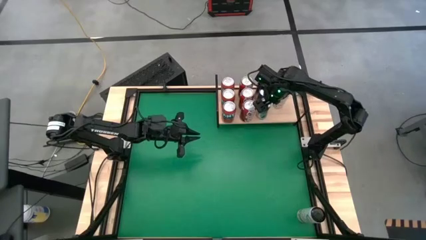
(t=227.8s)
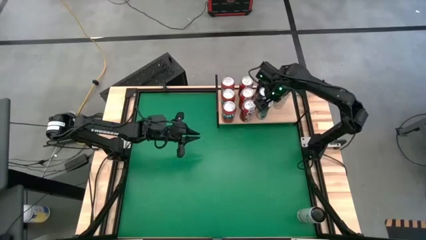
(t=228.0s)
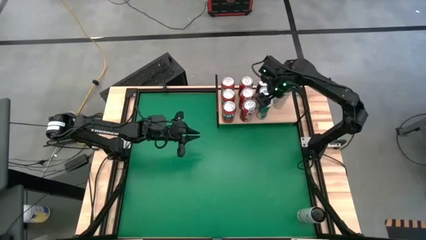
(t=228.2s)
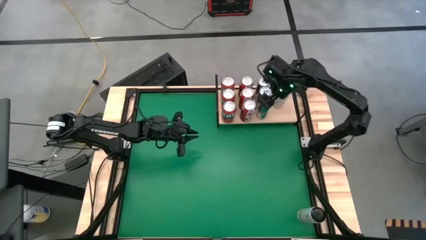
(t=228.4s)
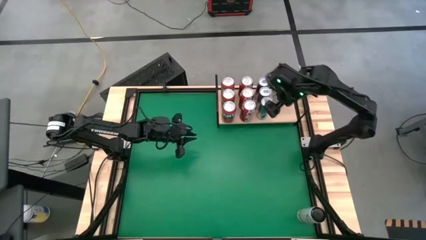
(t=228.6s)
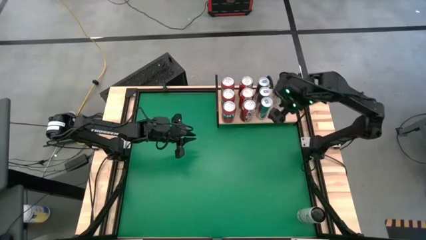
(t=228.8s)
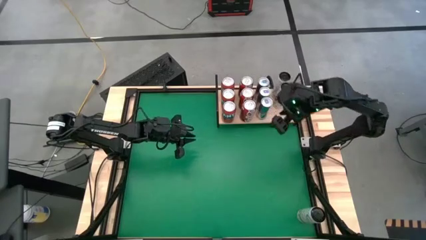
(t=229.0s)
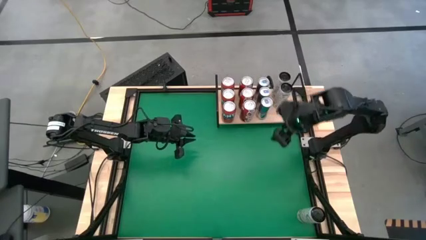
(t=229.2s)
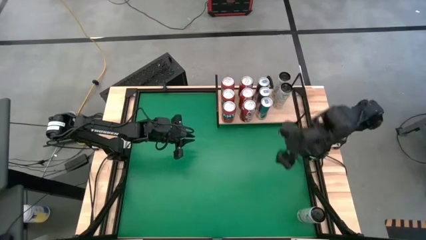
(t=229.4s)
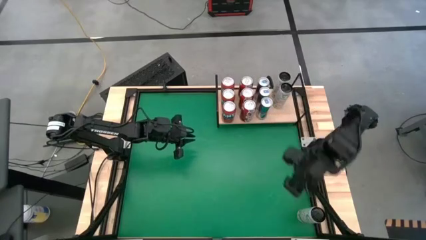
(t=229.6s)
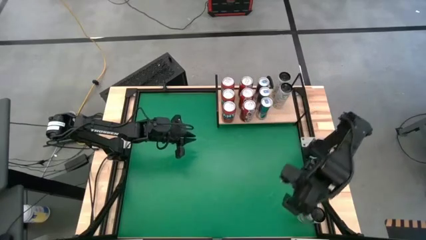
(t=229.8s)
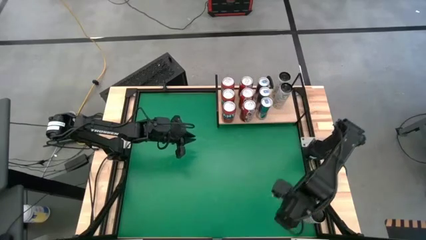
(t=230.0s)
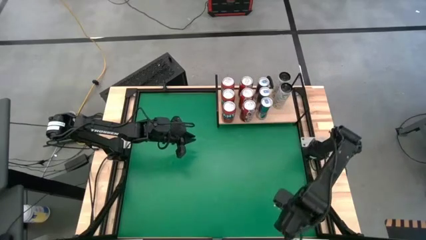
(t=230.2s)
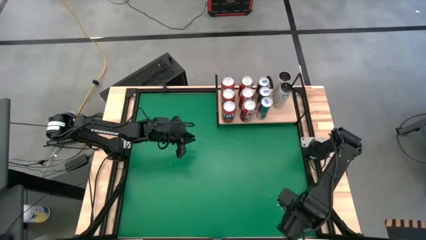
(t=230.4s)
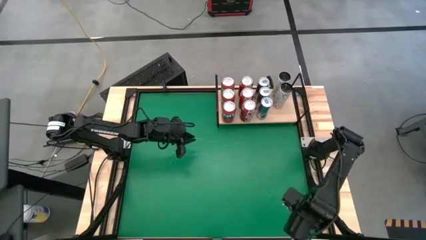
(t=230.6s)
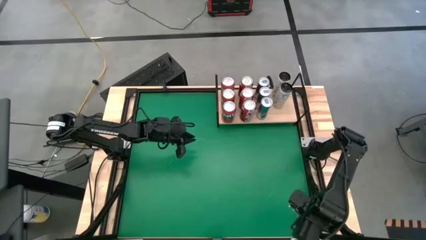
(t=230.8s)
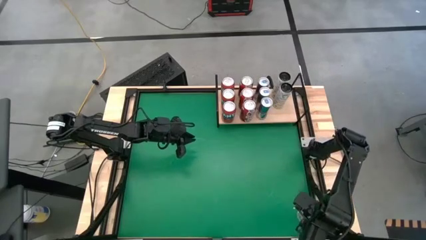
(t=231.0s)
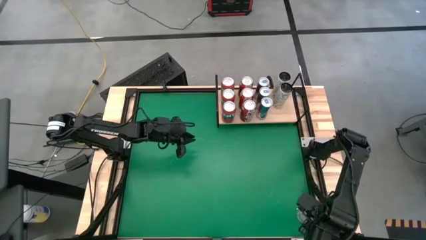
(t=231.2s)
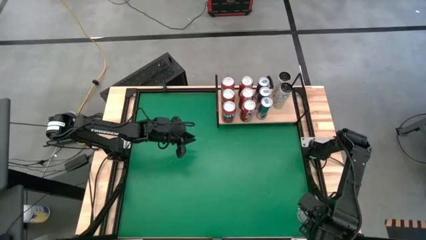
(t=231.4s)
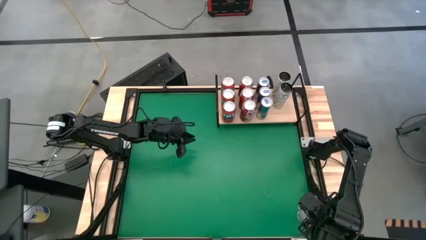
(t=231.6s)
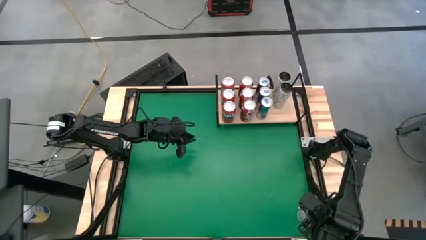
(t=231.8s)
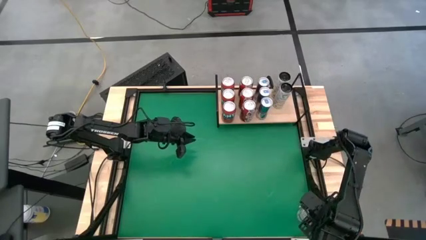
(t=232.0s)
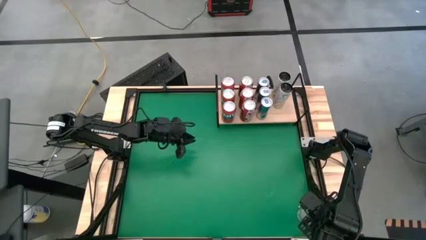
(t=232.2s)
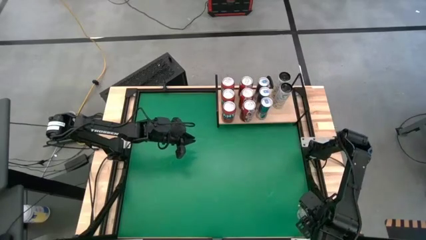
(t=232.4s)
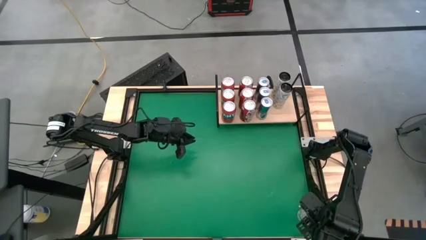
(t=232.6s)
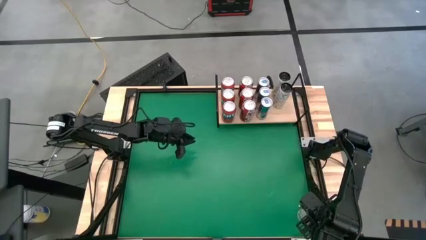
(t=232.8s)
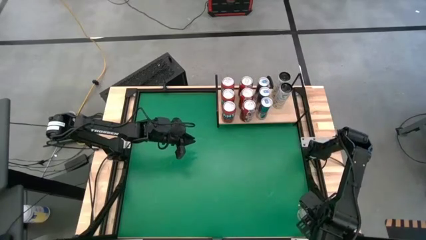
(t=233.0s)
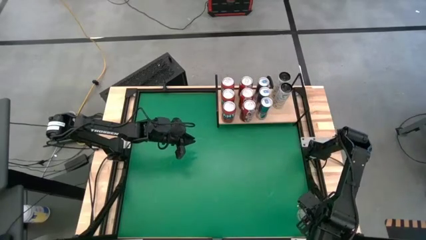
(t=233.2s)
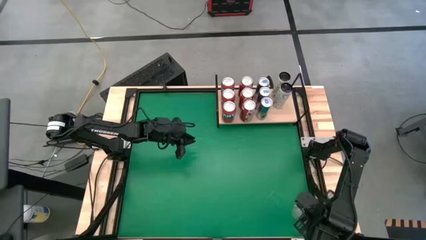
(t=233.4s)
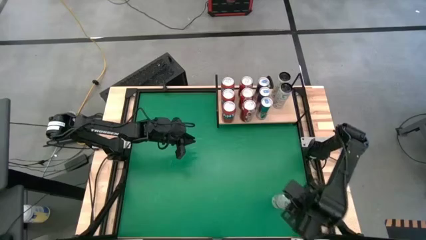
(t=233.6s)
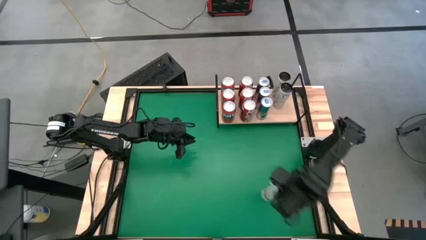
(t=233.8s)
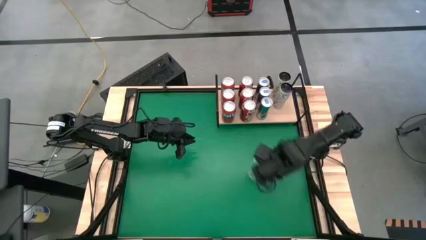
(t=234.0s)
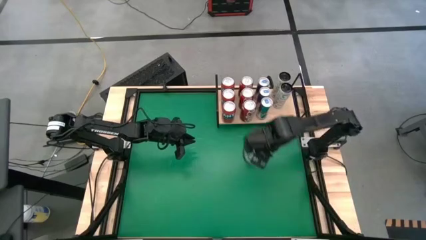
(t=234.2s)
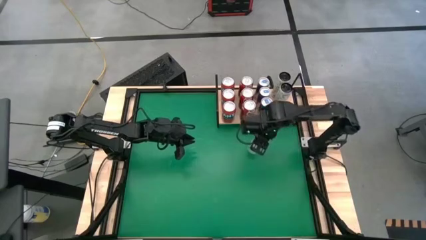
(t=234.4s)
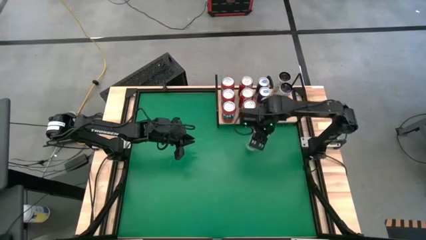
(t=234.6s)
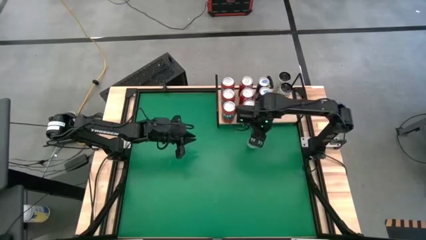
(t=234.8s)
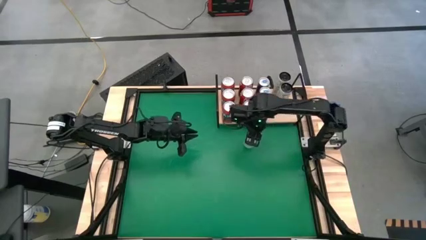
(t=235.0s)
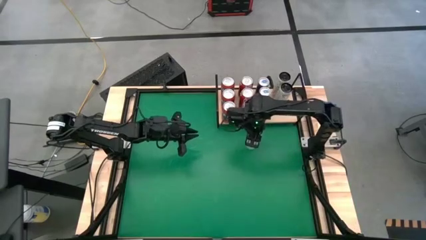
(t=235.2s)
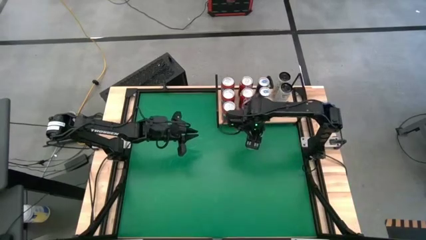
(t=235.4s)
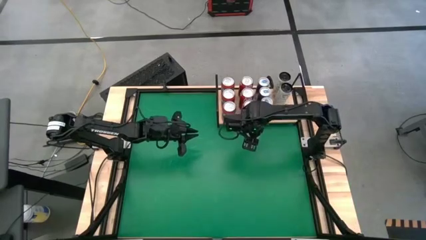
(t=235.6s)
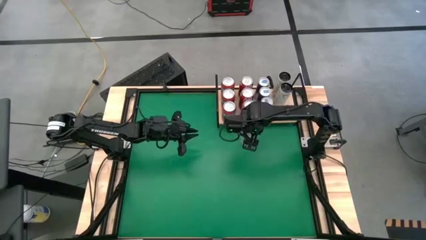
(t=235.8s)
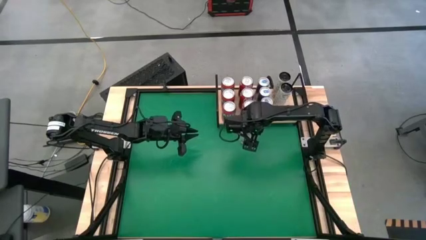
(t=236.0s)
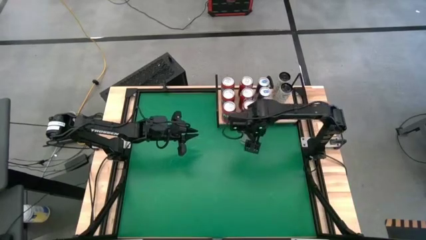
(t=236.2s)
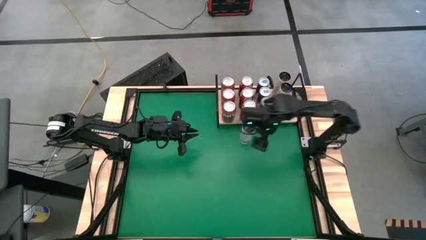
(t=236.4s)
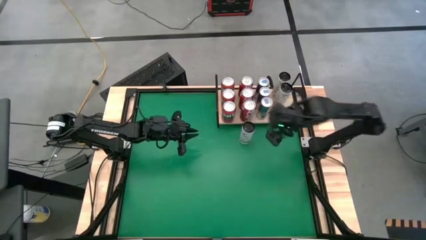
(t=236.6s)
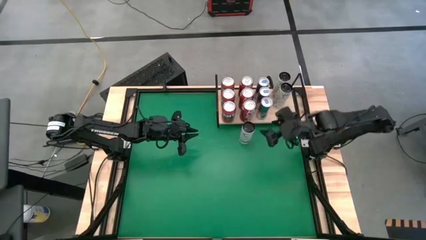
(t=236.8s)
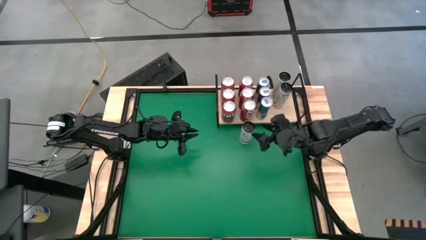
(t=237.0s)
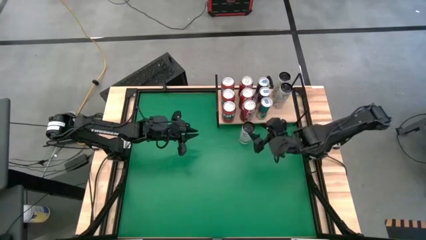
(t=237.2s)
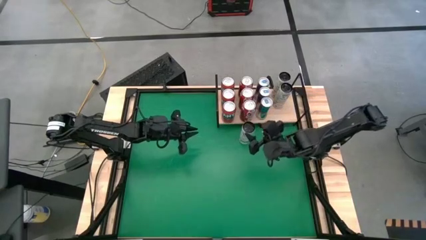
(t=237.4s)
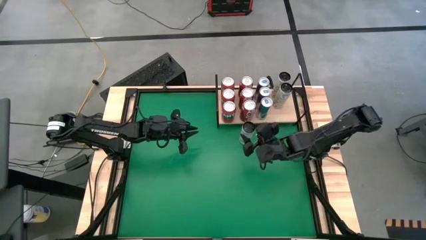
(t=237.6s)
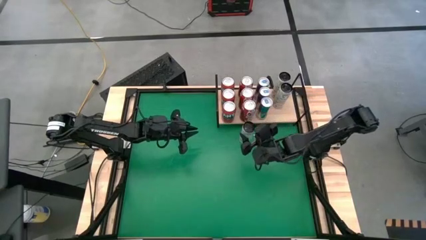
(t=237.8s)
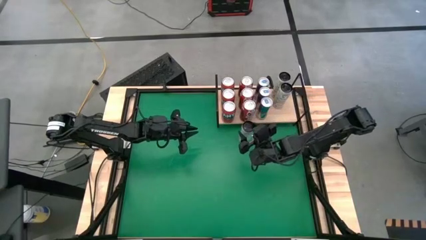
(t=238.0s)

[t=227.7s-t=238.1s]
Task: Place canned beverage on shelf
Put the yellow soda can on the shelf aligned with the other yellow soda cans
